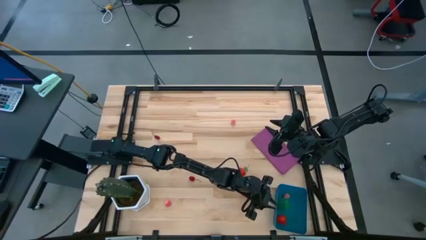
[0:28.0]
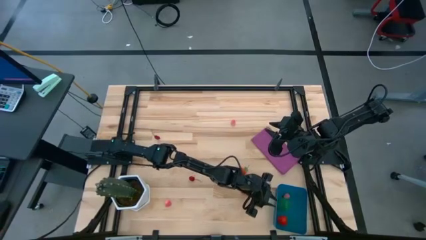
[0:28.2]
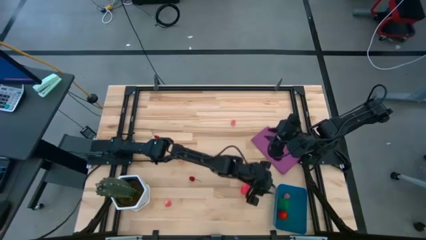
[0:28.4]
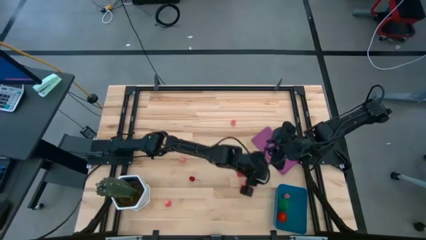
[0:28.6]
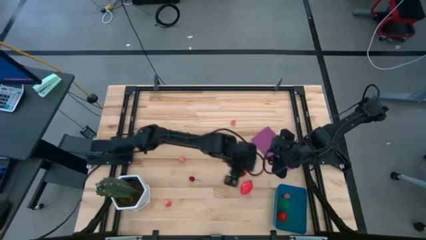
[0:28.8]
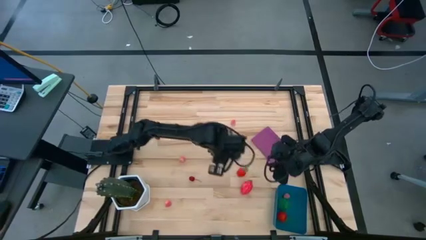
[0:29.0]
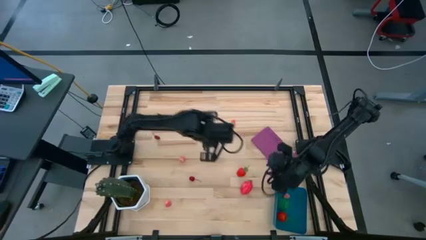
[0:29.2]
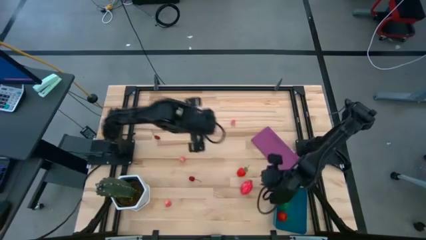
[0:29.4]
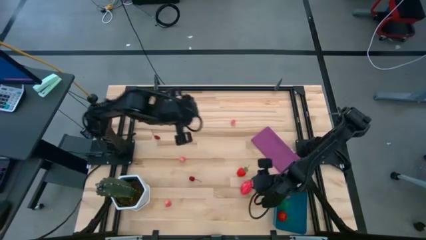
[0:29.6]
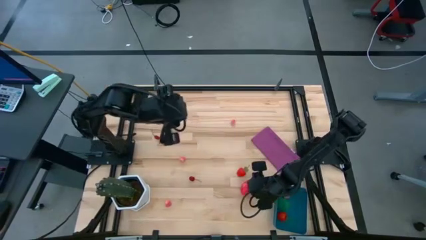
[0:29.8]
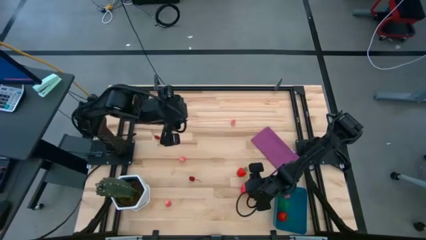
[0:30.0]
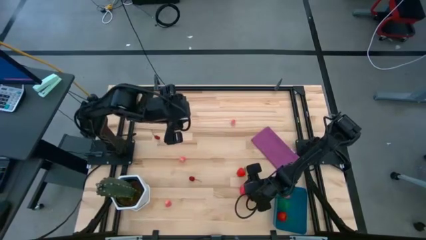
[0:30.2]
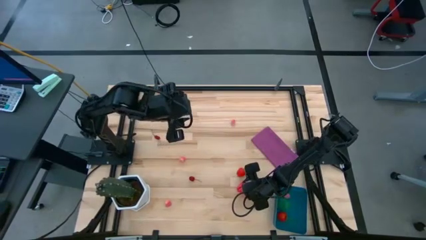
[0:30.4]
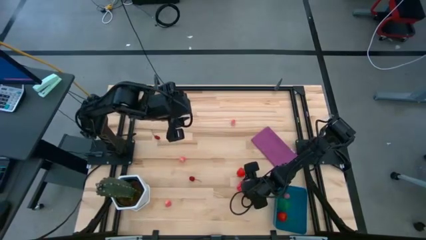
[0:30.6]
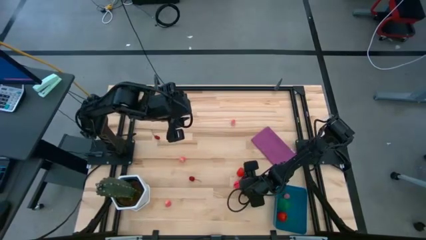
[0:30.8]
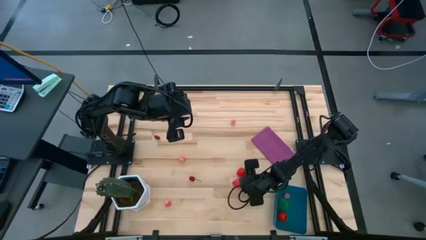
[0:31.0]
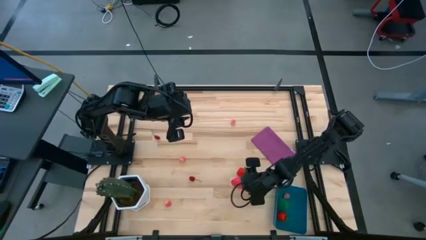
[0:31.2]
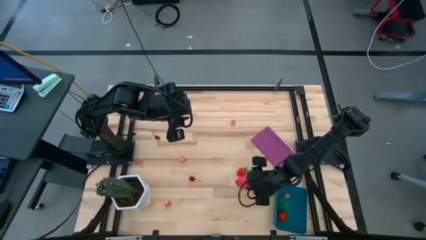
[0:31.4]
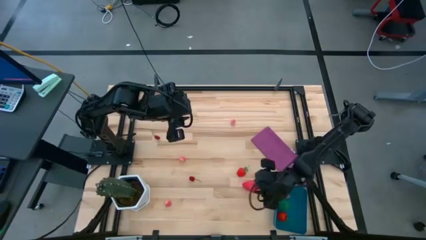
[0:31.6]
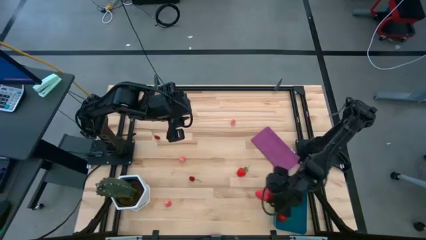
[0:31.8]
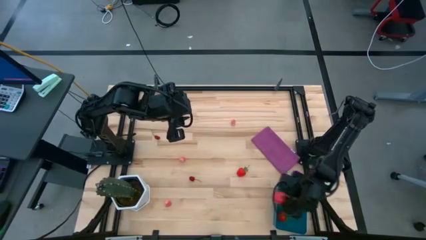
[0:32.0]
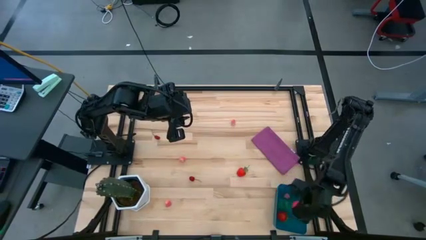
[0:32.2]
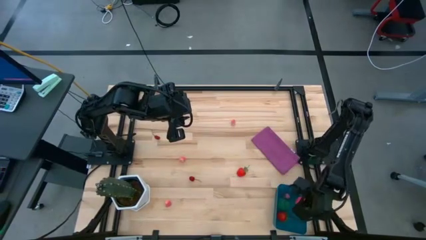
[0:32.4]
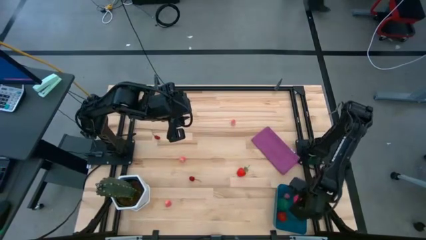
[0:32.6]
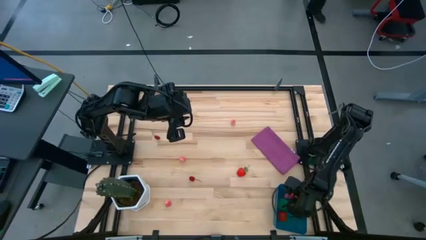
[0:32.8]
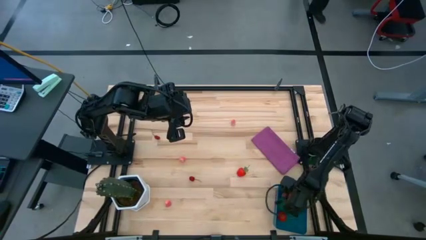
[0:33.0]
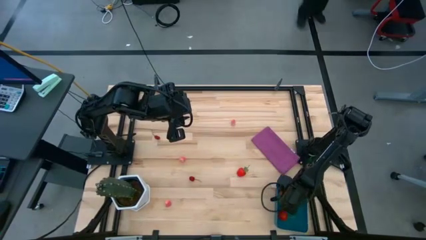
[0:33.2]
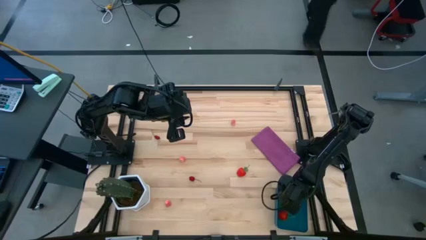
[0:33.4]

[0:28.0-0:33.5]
Task: Pick and placing Produce into tupperware
Put the dragon fruit into the blue bin

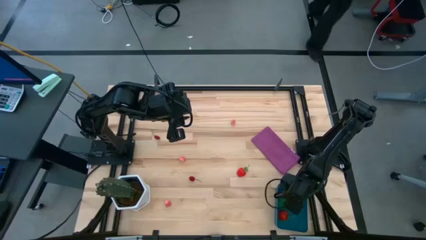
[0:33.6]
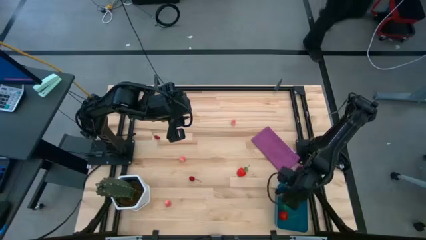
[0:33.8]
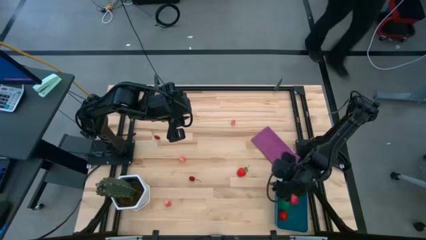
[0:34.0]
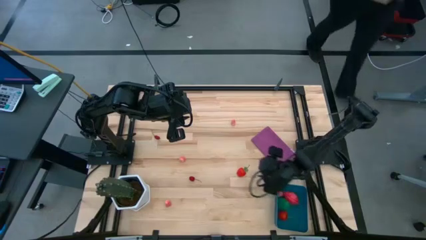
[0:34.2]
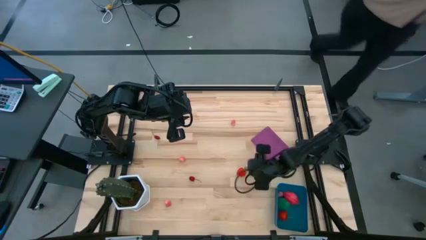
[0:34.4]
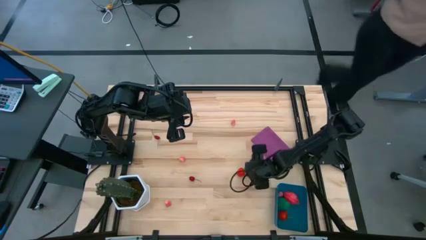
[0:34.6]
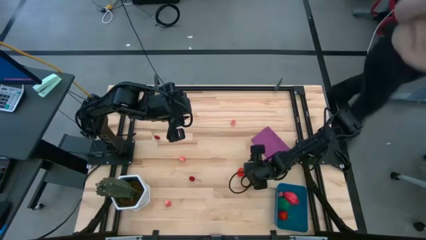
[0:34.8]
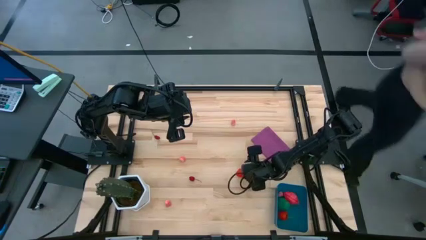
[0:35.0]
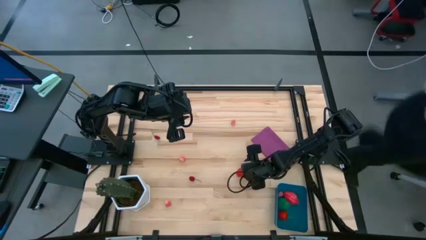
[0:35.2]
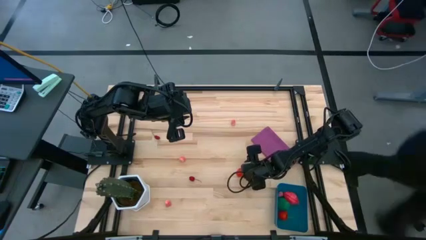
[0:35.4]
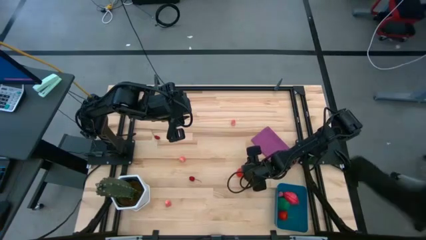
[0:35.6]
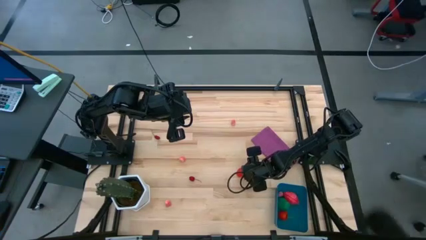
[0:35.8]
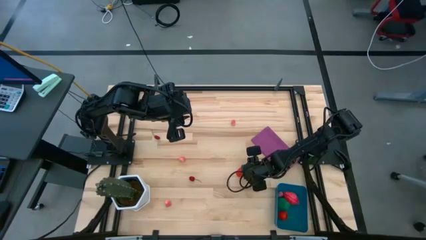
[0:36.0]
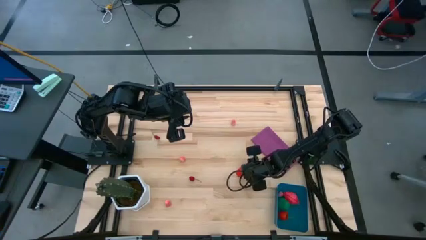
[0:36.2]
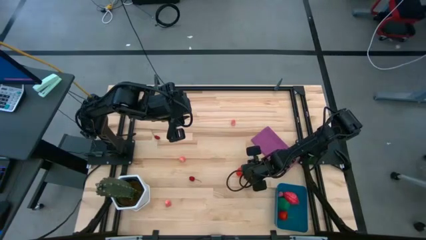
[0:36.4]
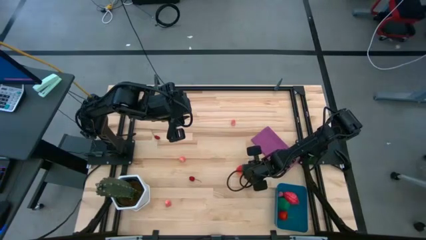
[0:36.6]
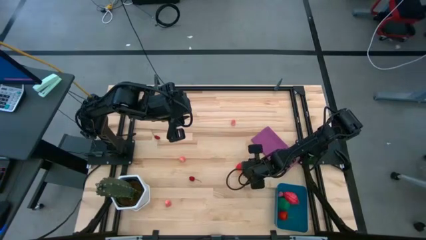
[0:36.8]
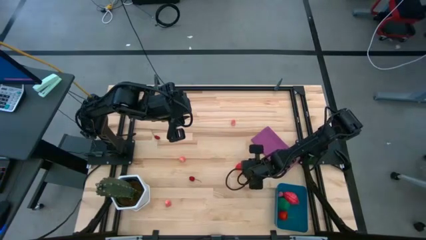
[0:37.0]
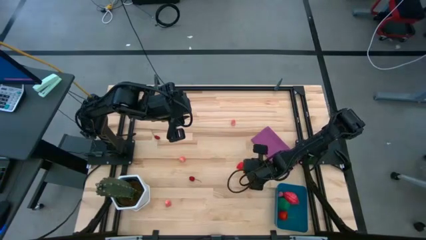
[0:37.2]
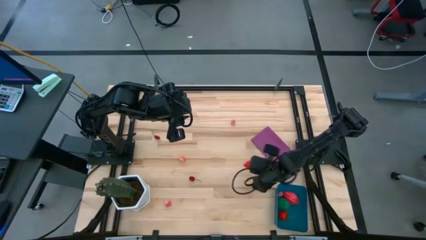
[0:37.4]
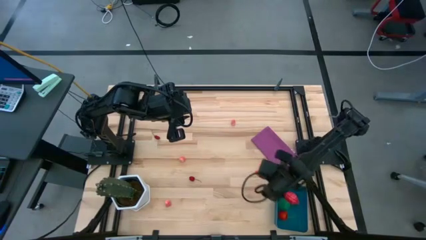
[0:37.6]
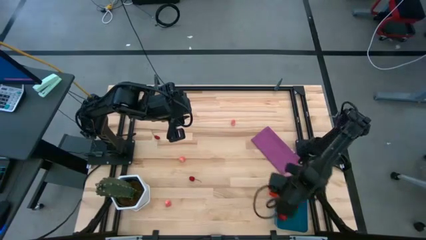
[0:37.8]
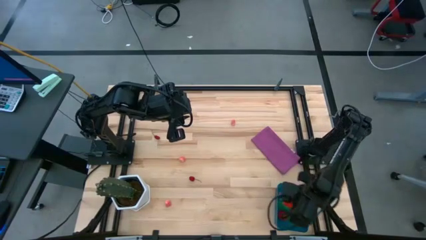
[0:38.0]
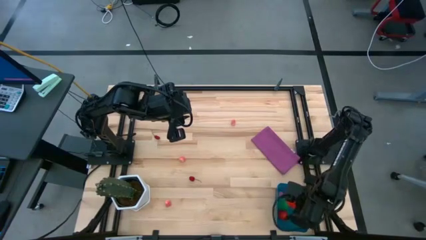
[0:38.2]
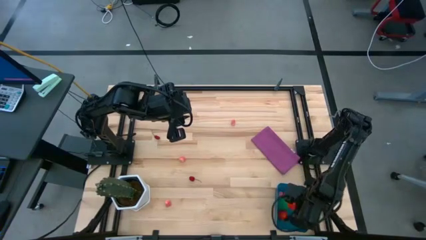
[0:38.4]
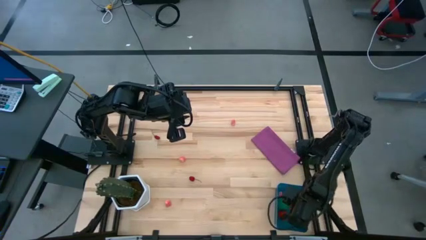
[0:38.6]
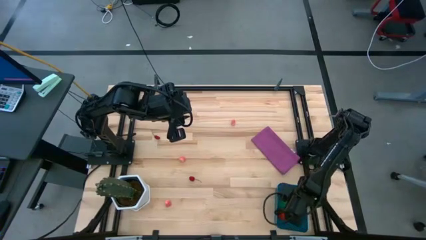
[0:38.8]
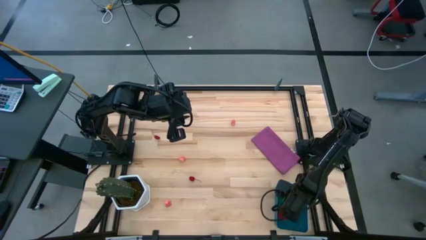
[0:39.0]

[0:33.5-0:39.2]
Put the red strawberry into the blue bin

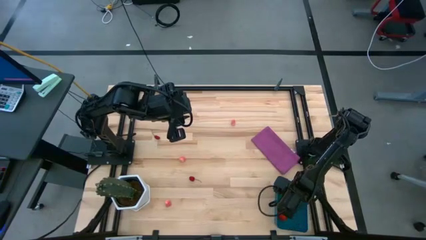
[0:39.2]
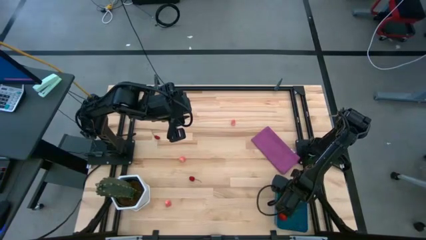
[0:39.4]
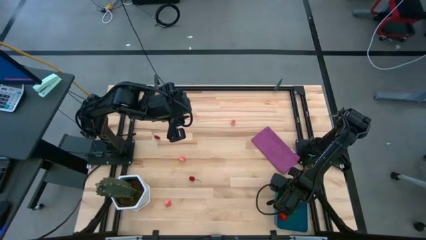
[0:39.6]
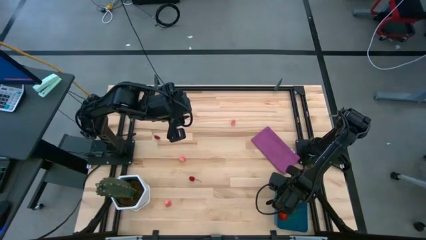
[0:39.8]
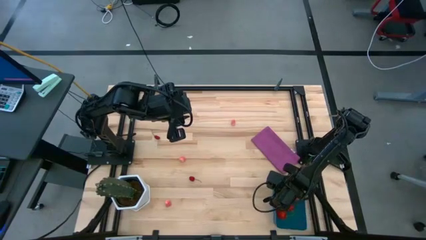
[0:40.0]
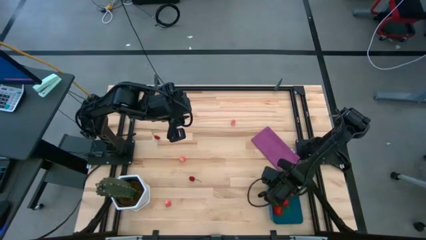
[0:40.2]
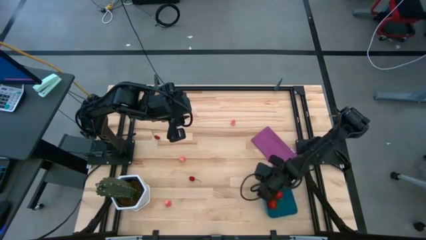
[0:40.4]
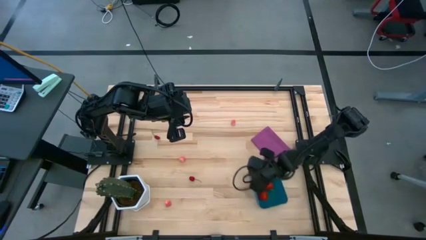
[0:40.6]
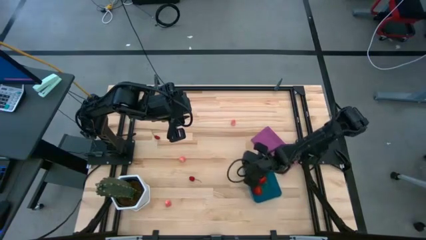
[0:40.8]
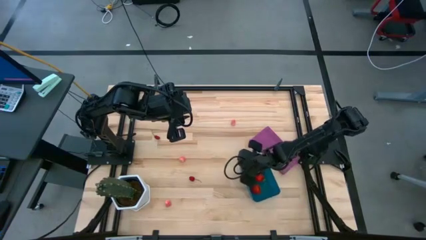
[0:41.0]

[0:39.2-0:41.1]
Adjust the blue bin

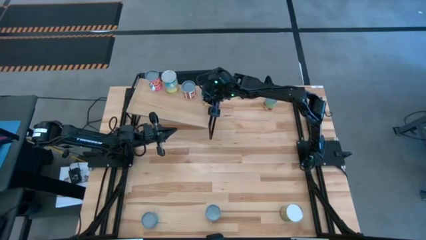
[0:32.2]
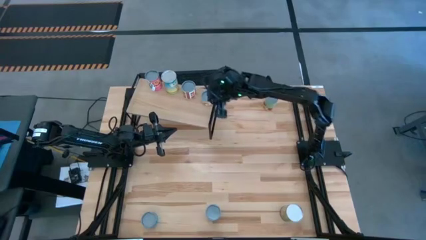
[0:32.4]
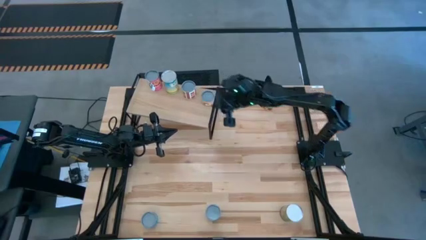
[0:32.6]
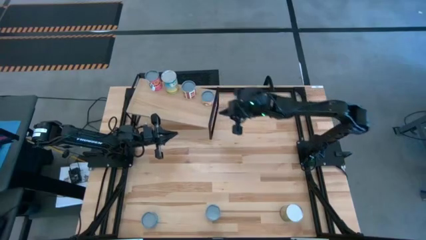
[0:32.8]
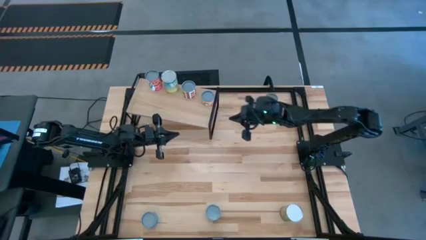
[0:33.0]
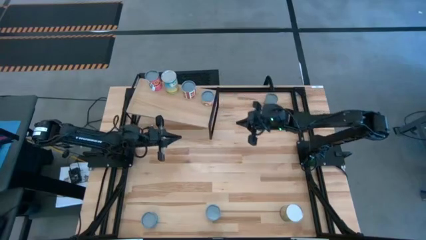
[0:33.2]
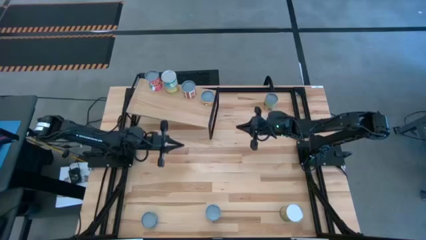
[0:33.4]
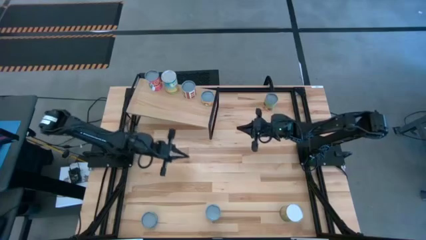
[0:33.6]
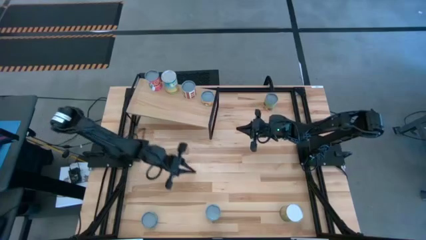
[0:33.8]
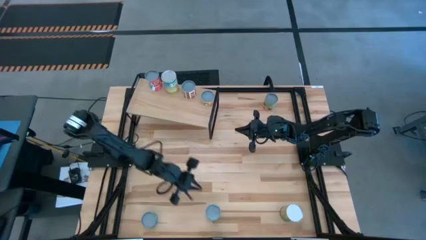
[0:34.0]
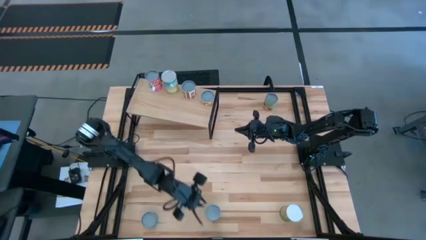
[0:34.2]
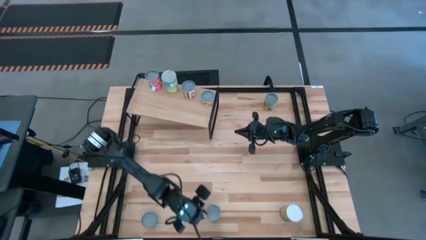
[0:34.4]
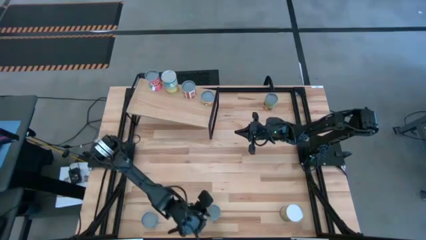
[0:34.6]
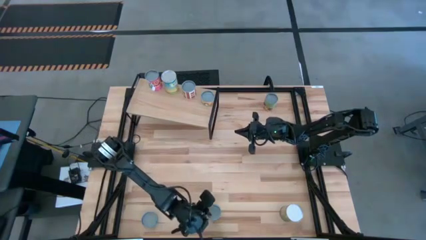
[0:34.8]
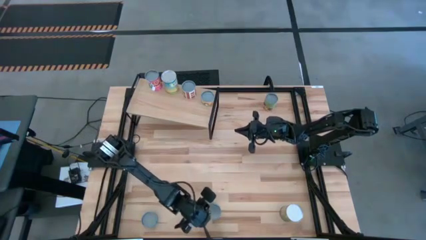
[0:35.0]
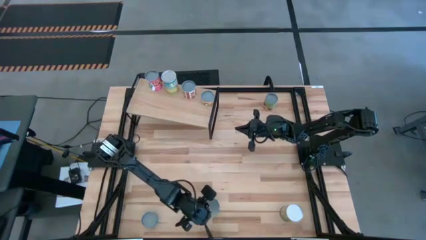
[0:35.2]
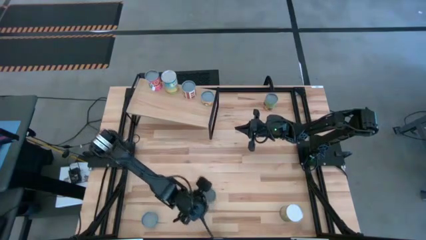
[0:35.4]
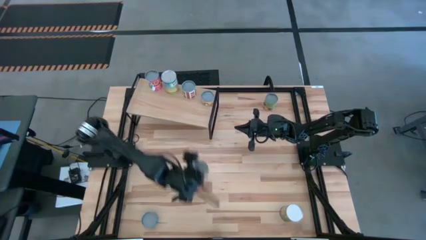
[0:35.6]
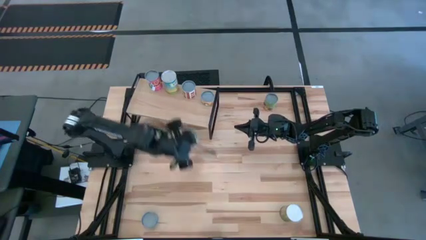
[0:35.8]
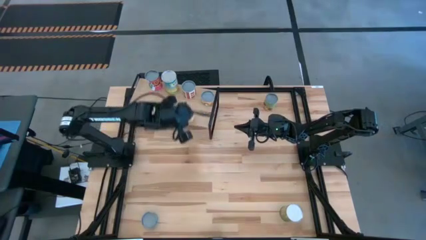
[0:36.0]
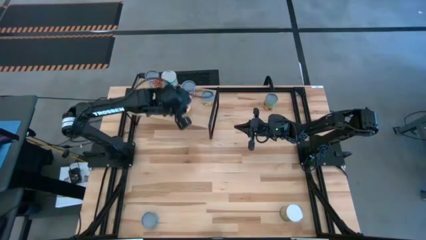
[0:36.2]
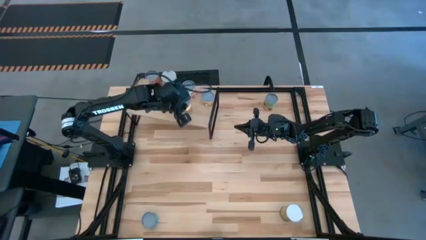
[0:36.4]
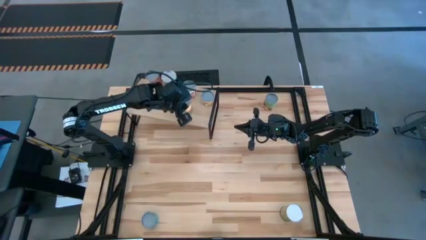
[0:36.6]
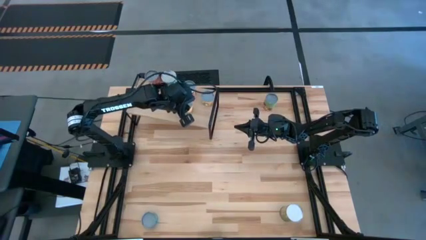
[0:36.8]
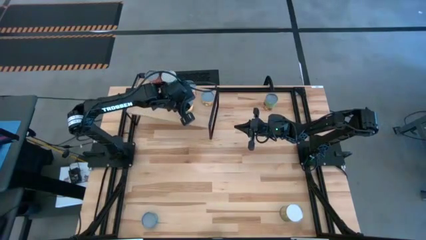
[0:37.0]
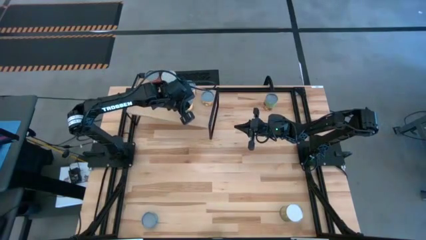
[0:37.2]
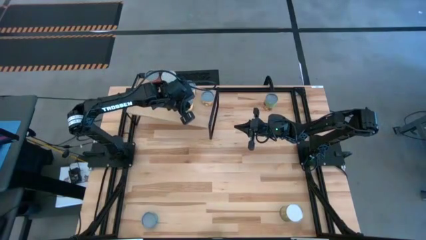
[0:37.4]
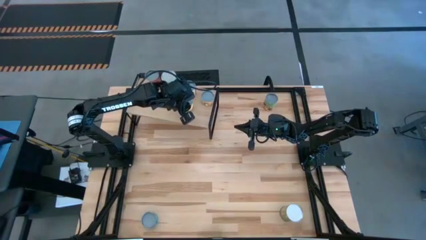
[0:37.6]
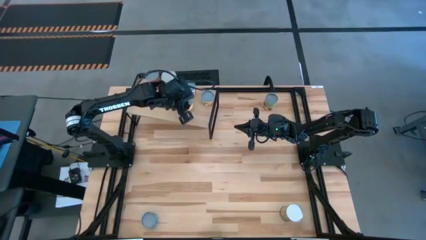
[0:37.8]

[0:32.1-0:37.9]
Task: Pick and place cans onto a shelf
Put the canned sliced peaches on the shelf
